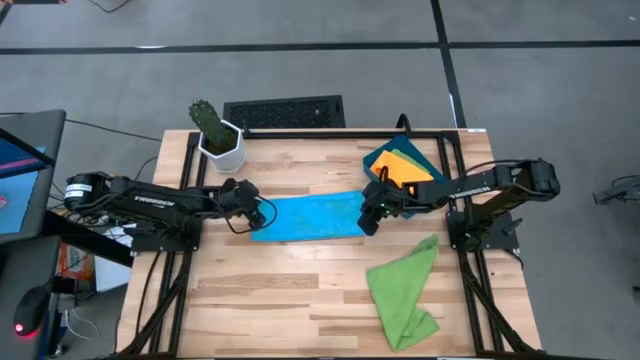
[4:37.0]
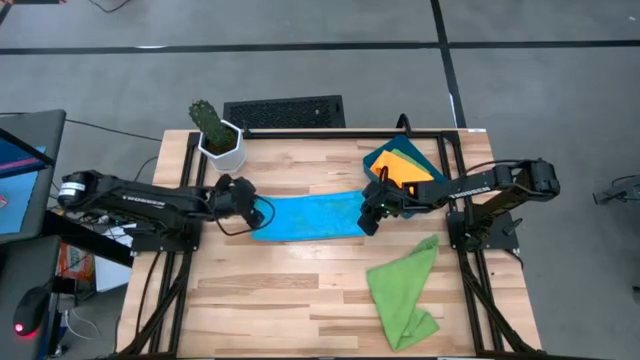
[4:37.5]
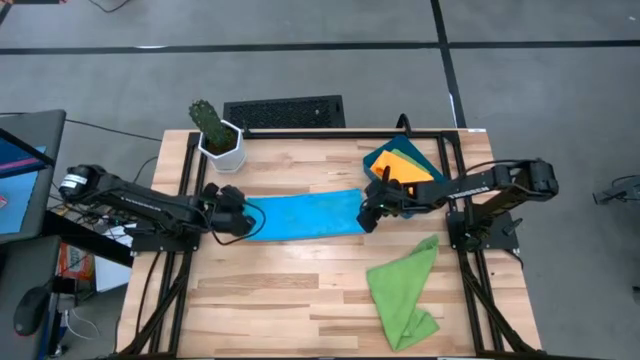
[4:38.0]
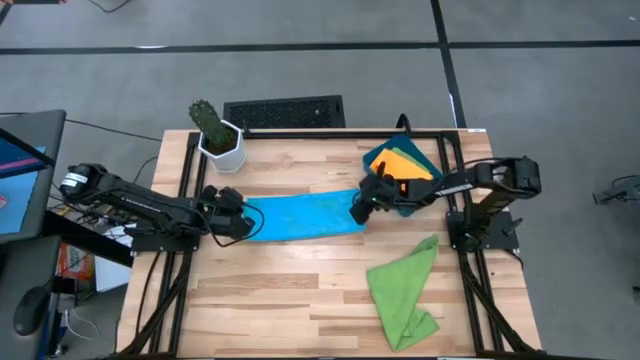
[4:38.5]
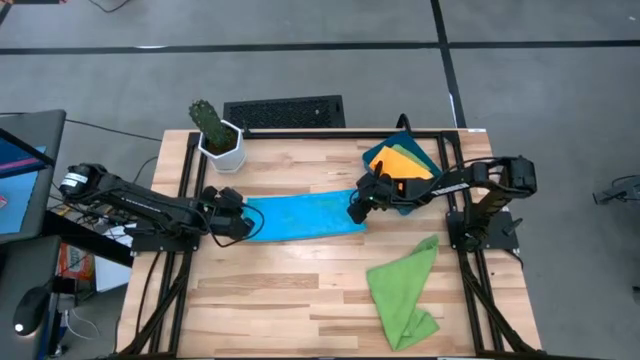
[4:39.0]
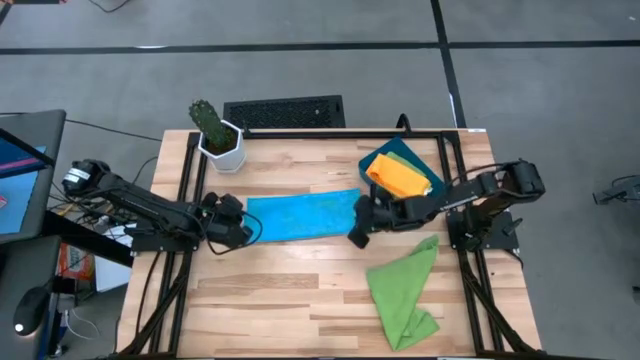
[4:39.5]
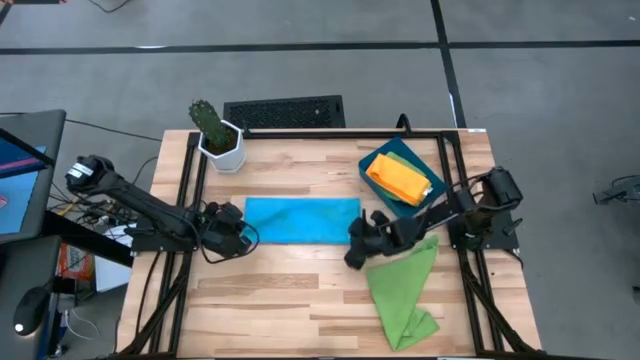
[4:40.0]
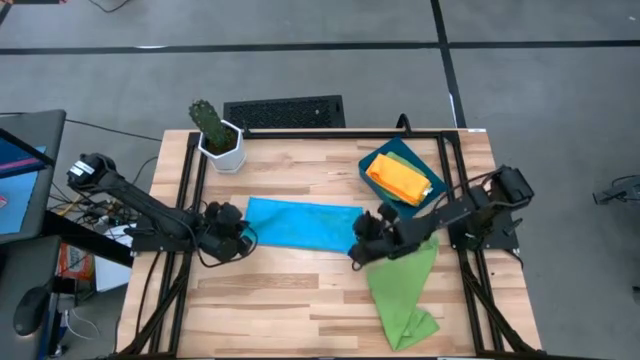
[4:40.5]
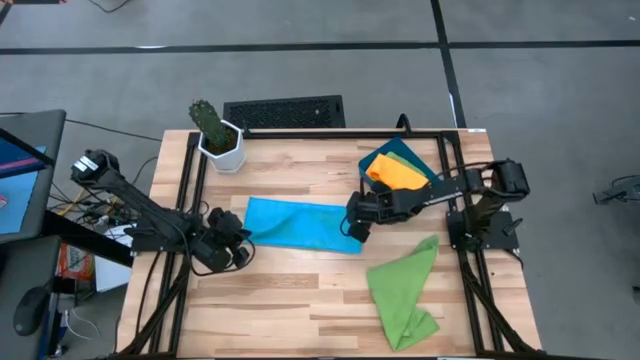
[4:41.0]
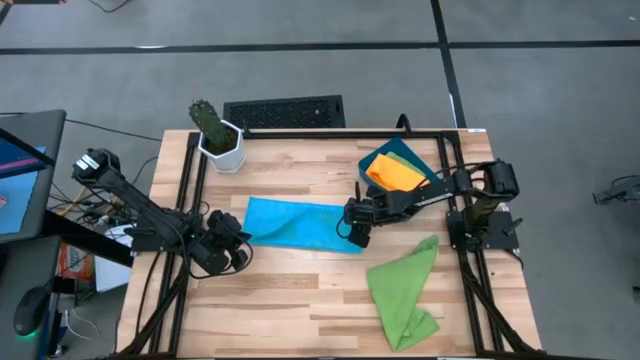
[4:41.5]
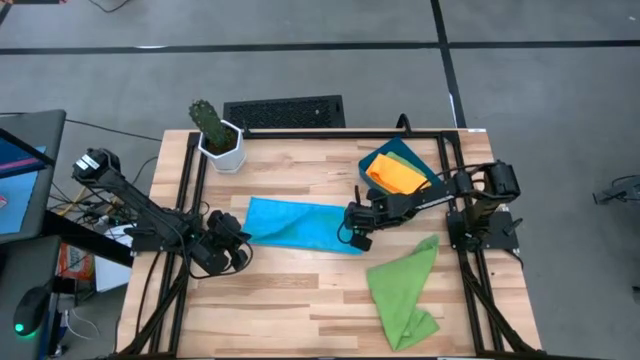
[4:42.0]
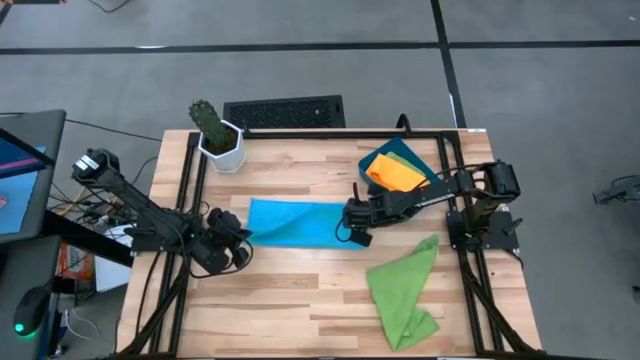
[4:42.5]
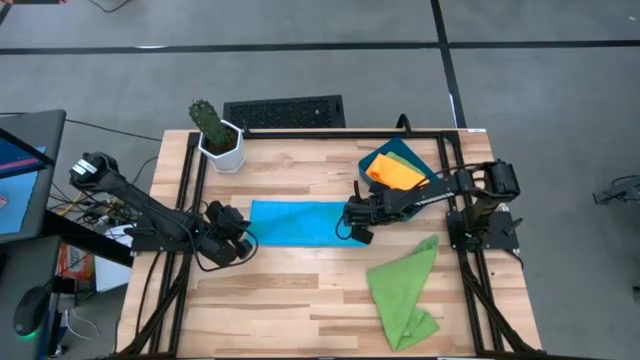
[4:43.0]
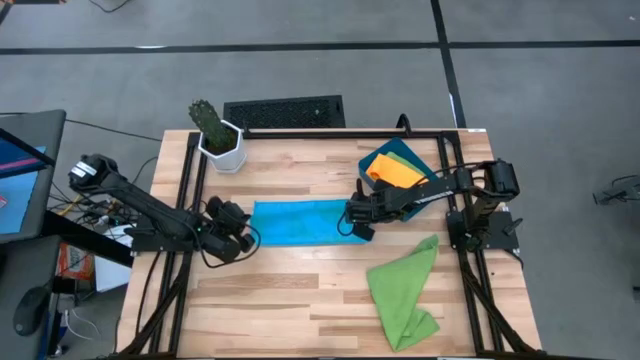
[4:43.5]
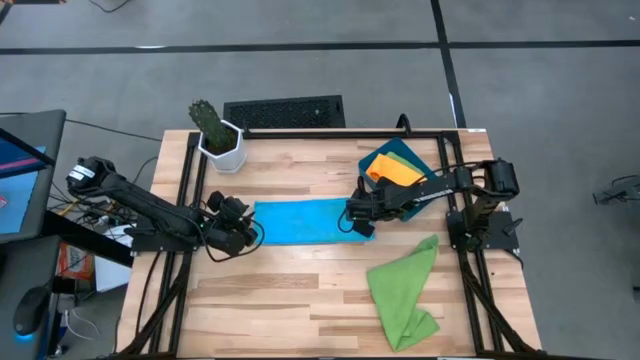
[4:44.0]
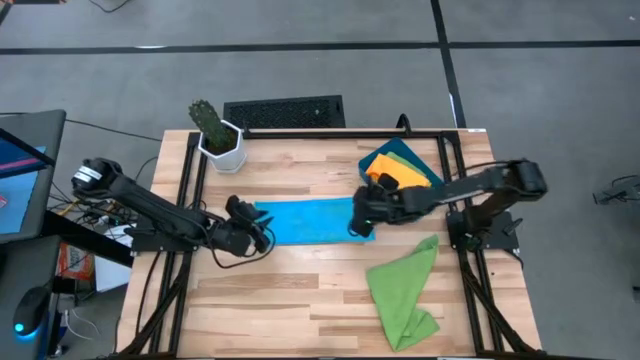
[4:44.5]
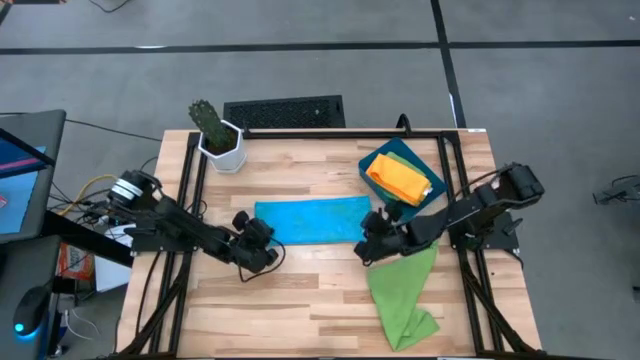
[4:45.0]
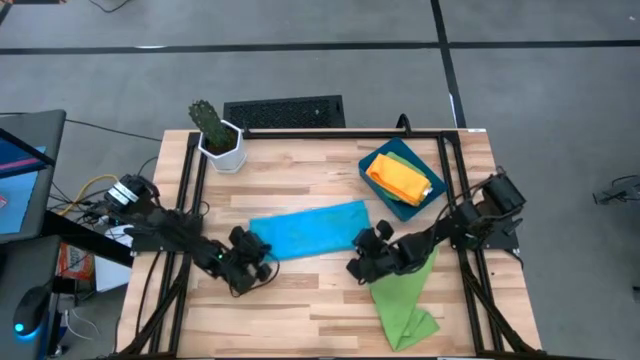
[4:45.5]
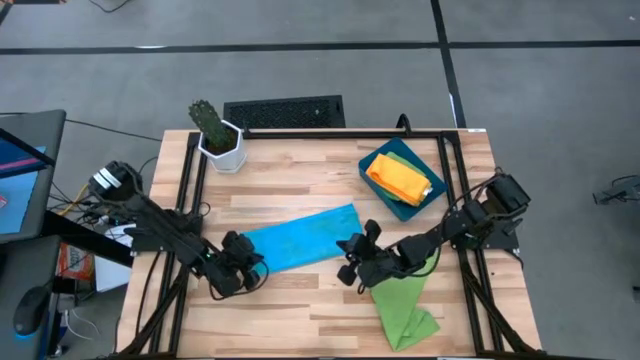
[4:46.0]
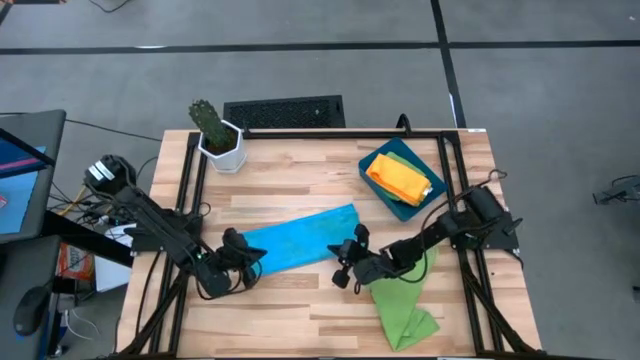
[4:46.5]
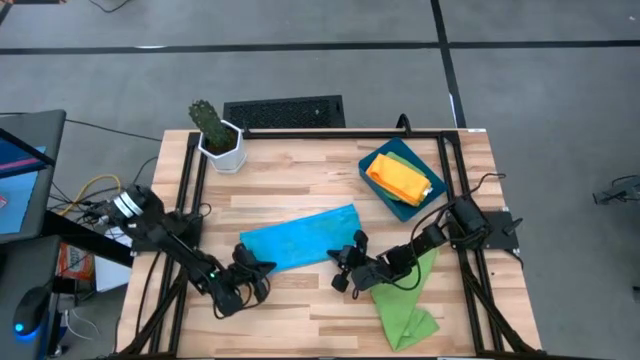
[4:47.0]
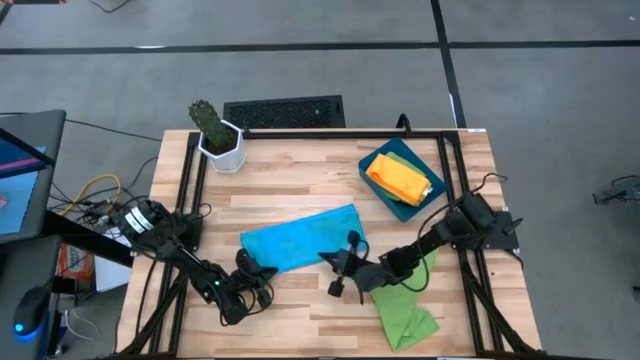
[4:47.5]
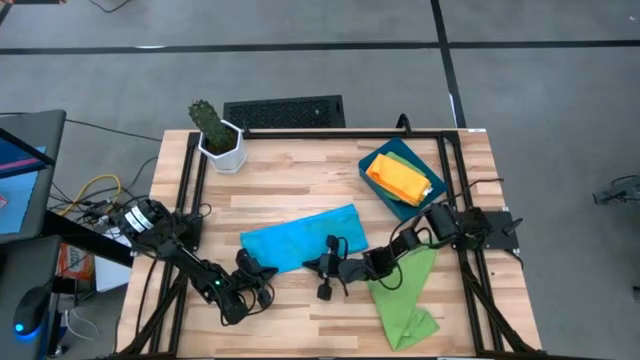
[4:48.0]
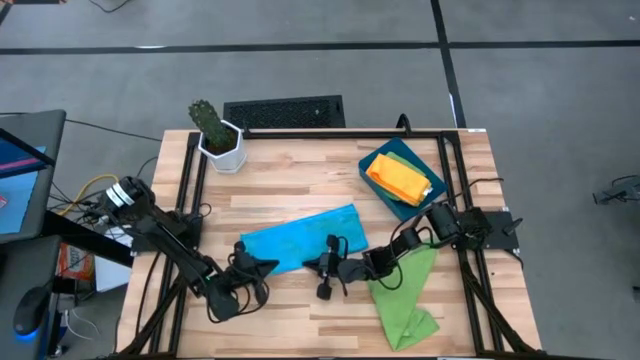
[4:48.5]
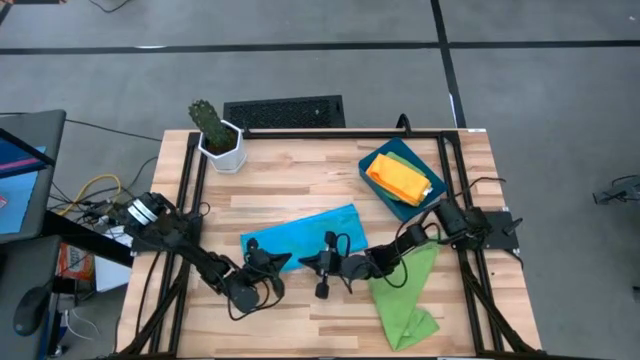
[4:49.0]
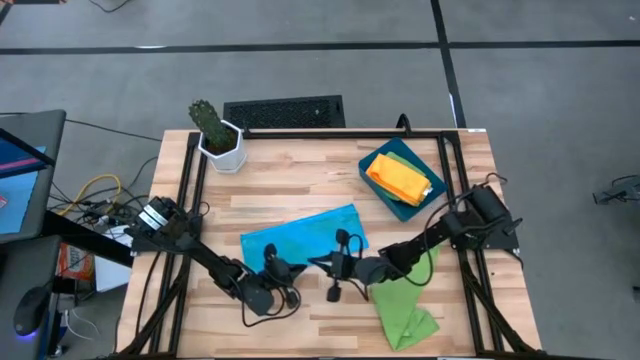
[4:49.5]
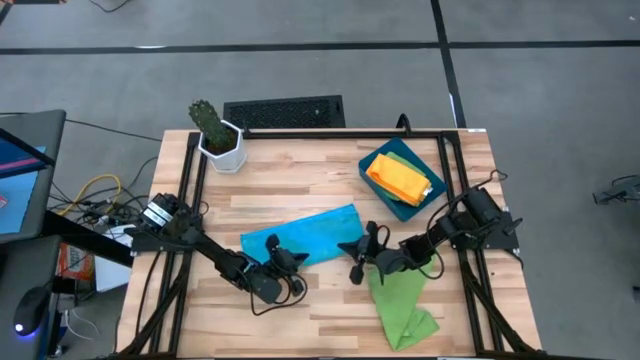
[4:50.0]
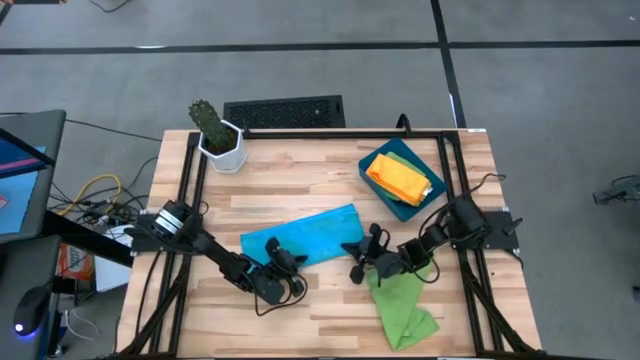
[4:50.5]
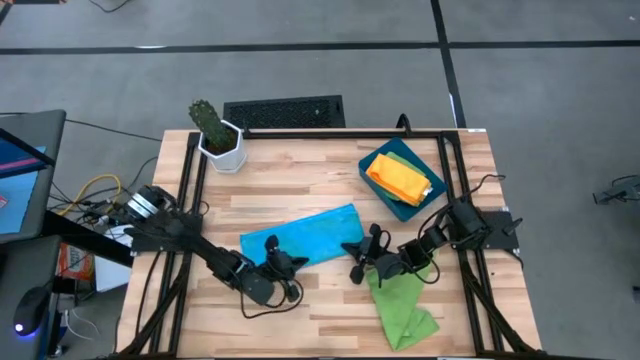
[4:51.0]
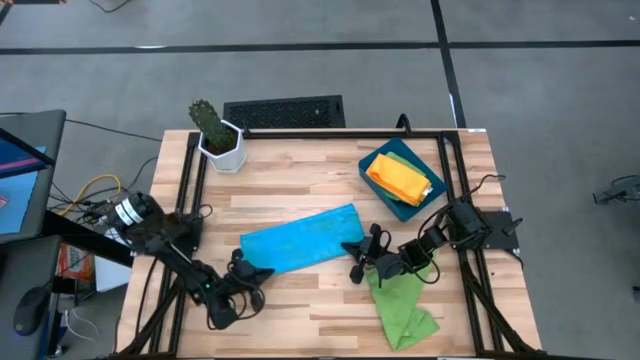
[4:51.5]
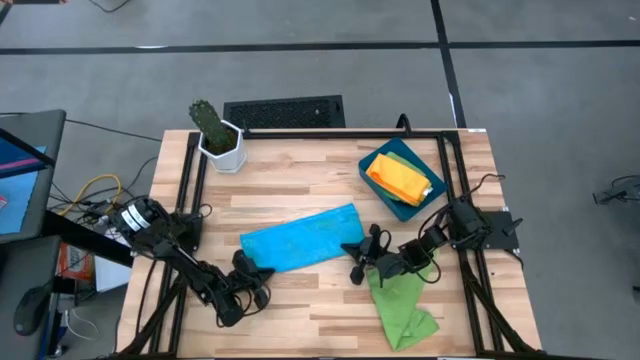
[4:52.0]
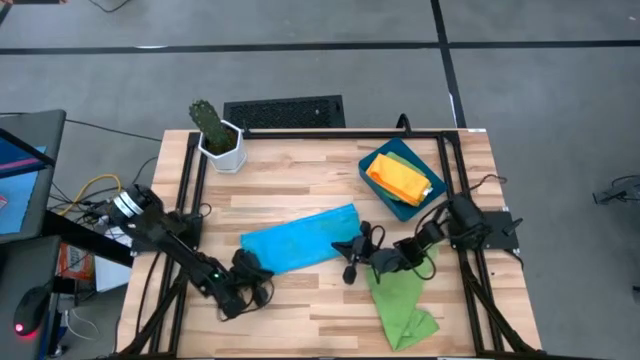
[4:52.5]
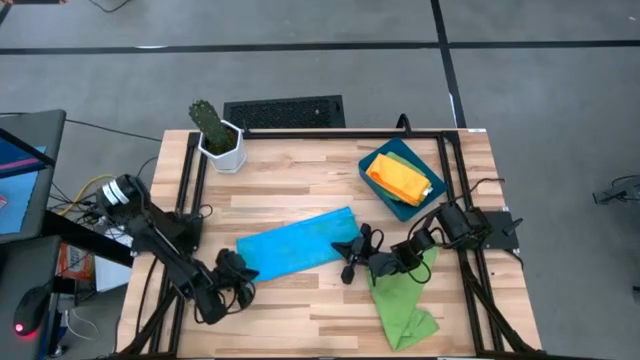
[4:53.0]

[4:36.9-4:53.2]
Task: Fold microfiber towels
Fold the blue microfiber cloth

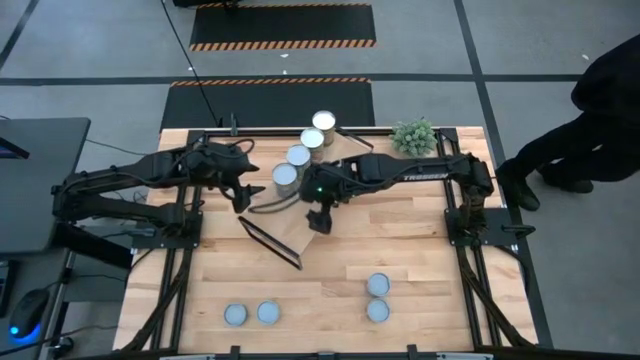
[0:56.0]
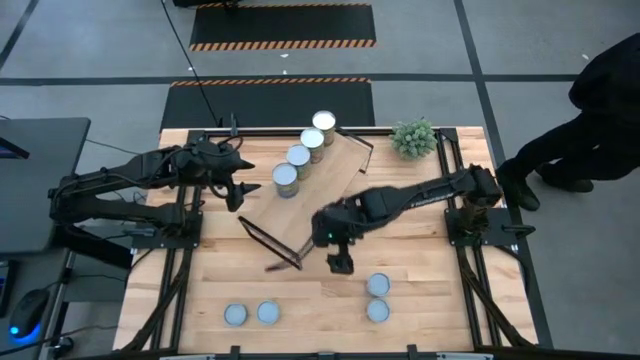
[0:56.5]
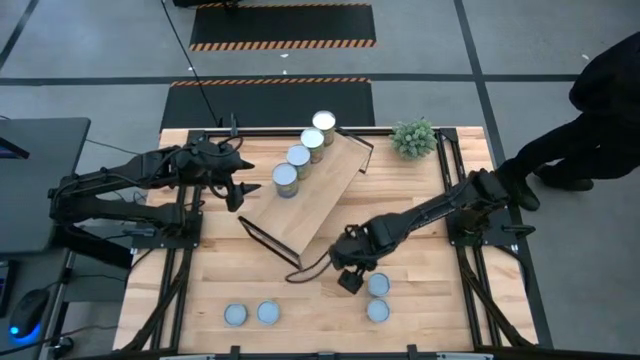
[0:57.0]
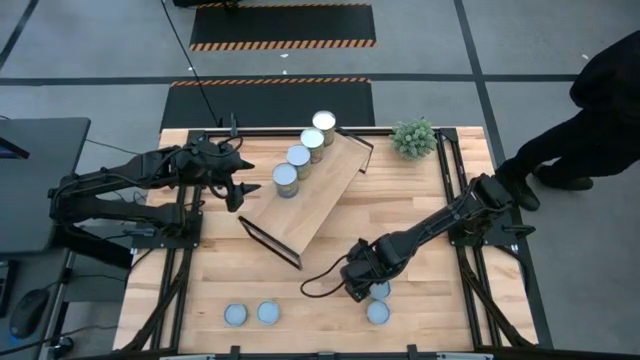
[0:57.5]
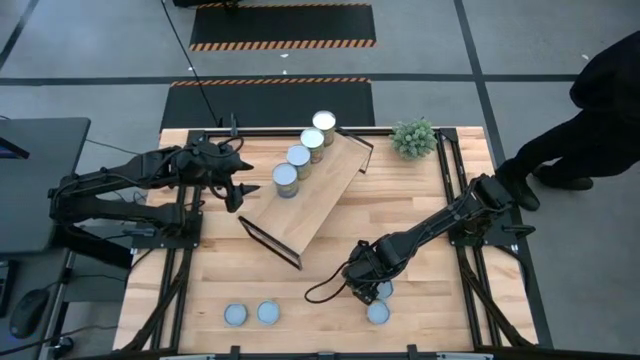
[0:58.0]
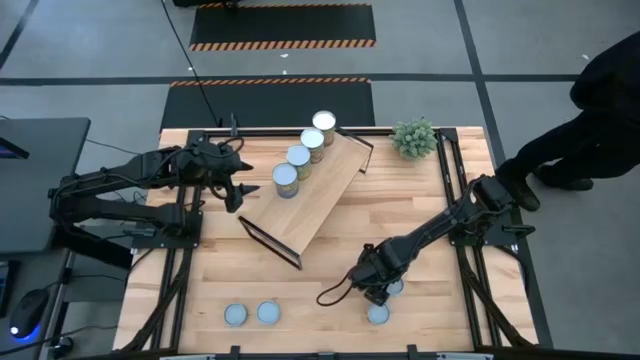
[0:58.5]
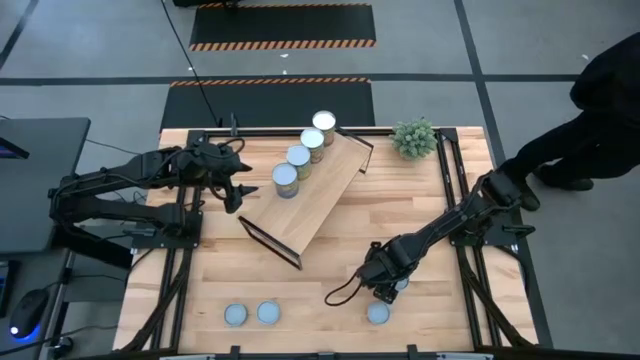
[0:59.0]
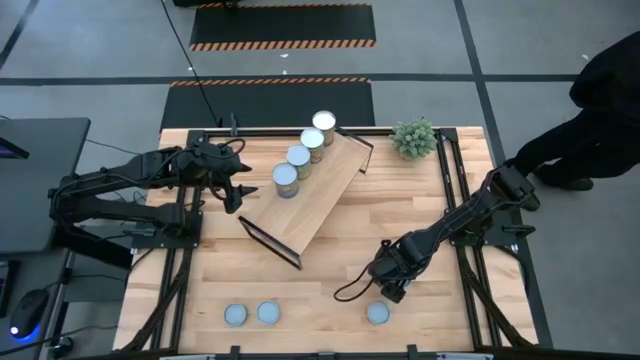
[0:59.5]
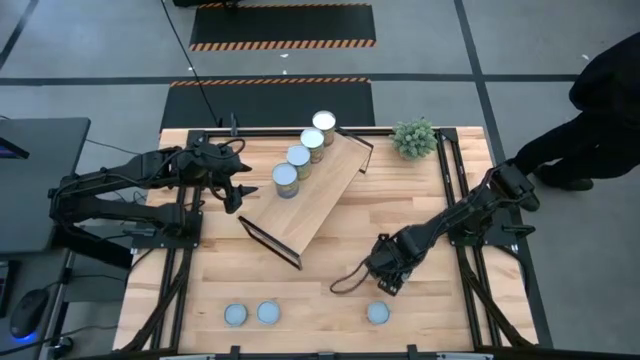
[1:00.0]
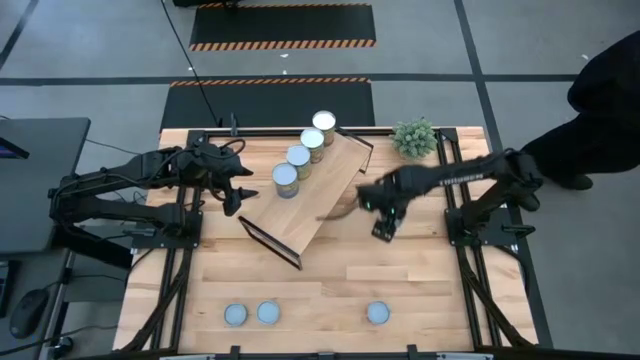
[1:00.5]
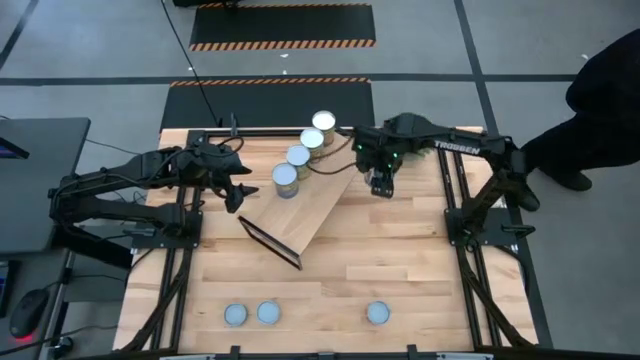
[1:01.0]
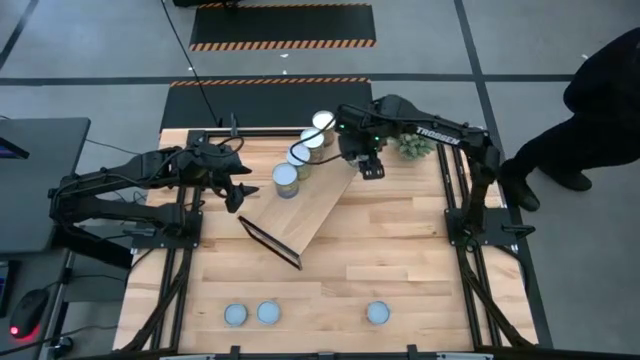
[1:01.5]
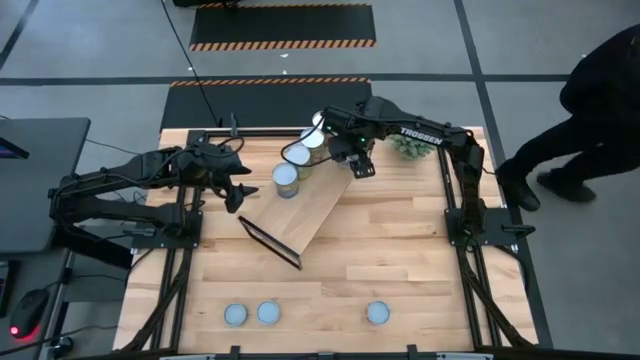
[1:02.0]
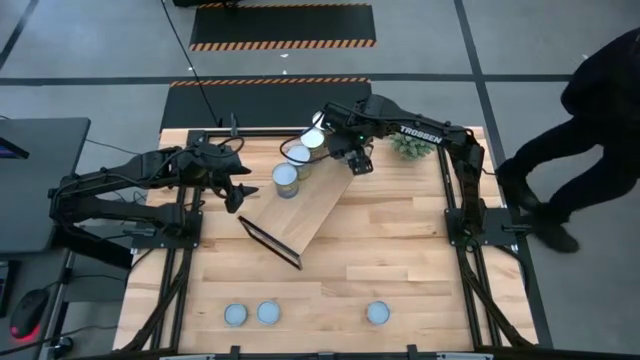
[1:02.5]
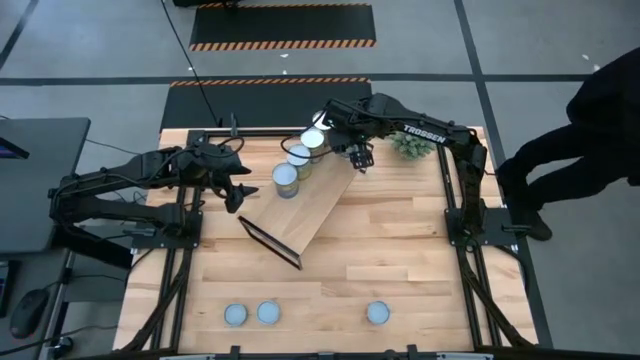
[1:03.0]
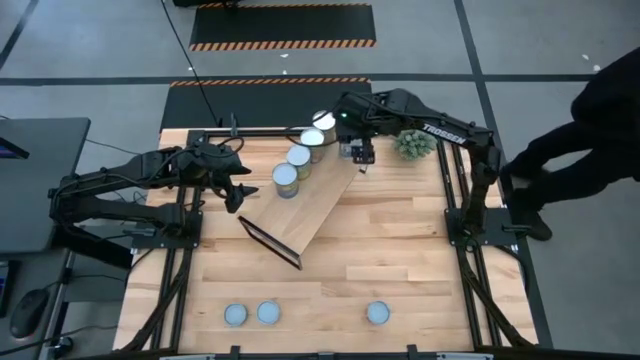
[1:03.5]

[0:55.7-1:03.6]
Task: Pick and place cans onto a shelf
Put the canned mix vegetables on the shelf
